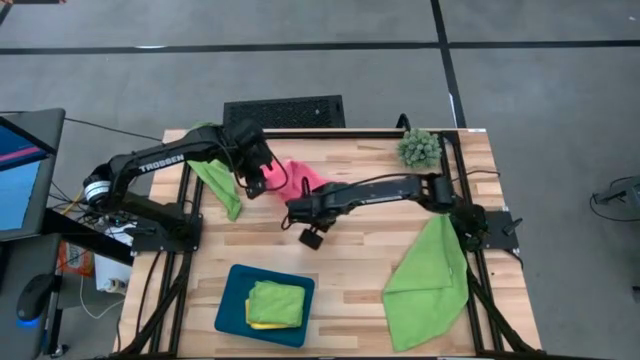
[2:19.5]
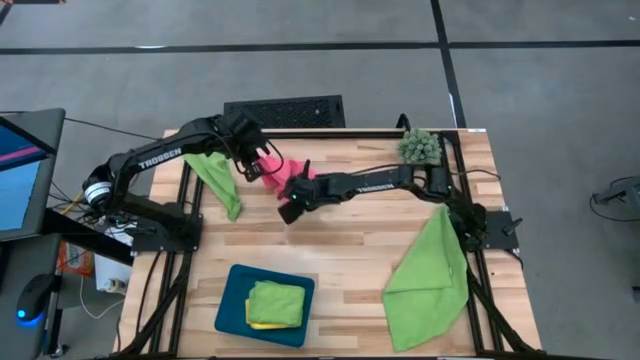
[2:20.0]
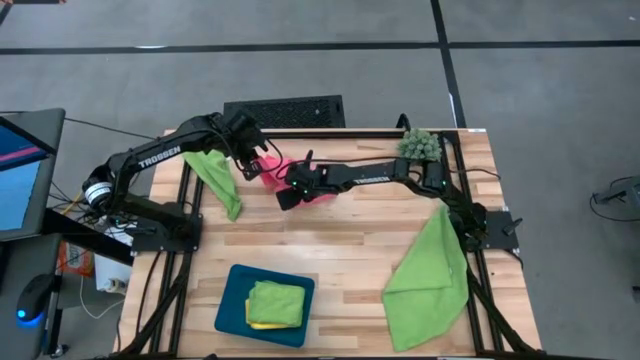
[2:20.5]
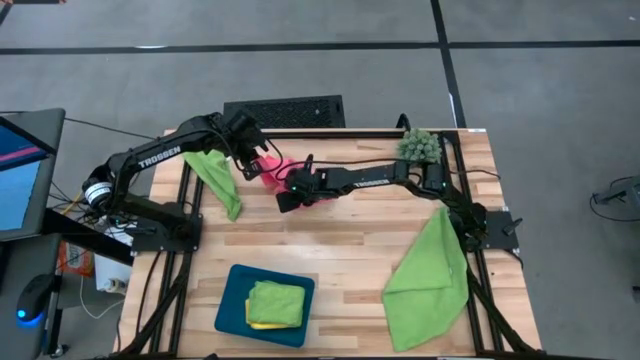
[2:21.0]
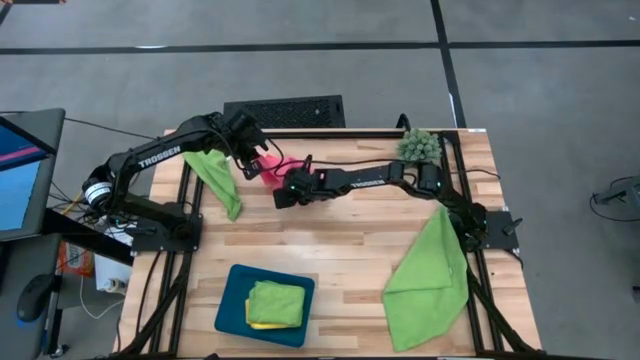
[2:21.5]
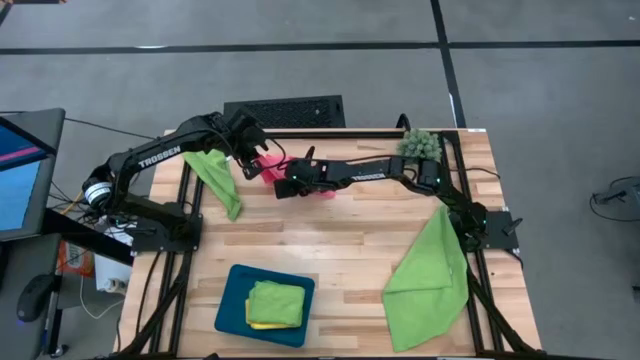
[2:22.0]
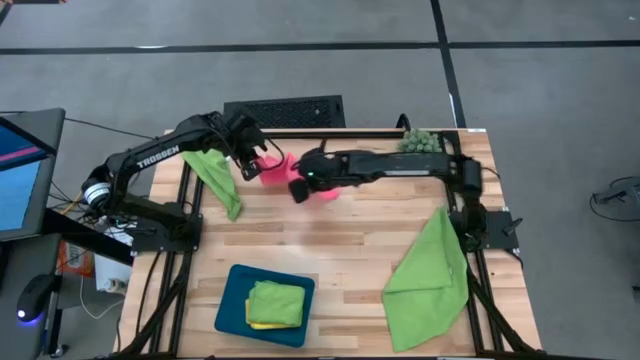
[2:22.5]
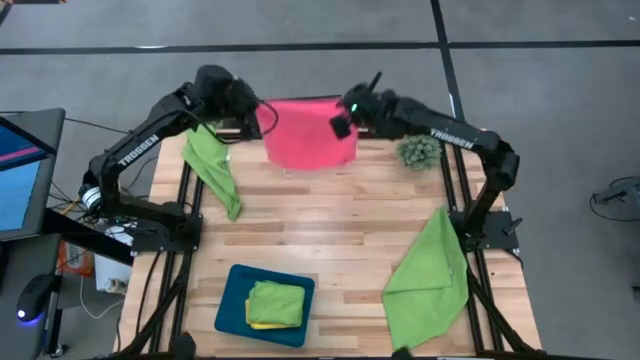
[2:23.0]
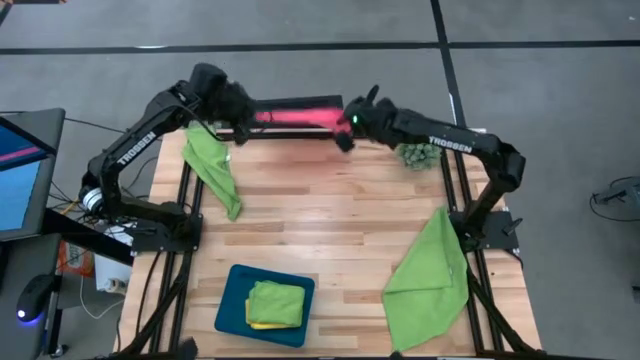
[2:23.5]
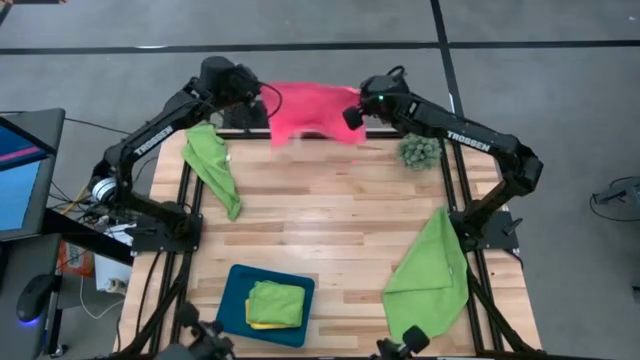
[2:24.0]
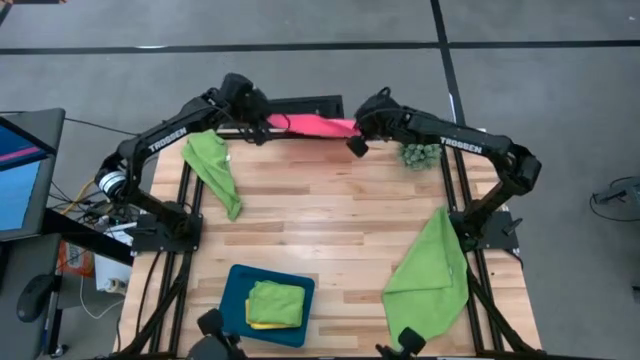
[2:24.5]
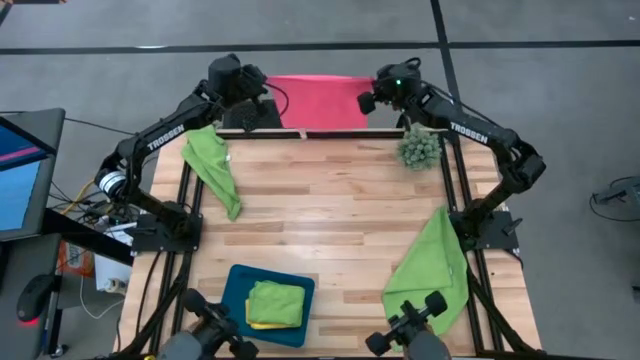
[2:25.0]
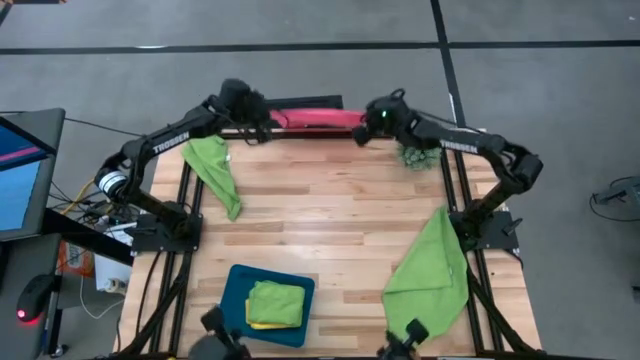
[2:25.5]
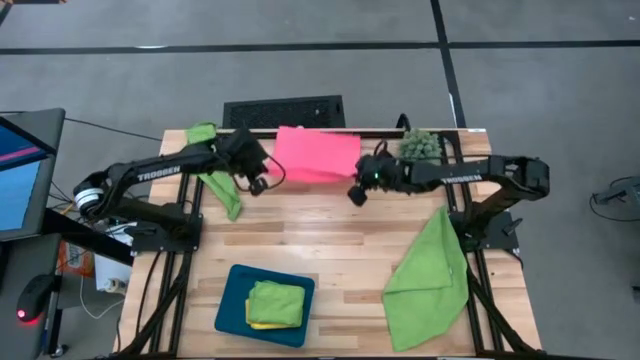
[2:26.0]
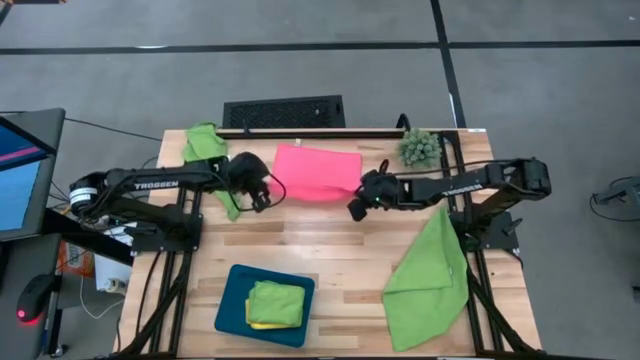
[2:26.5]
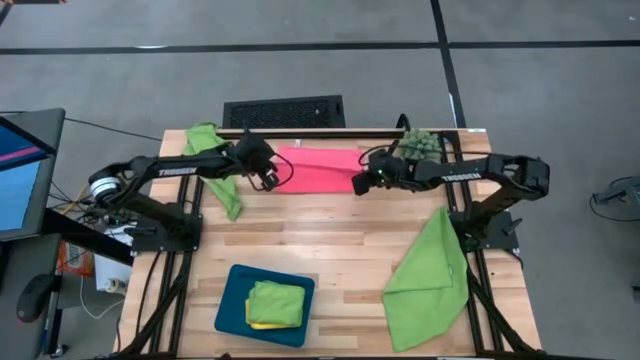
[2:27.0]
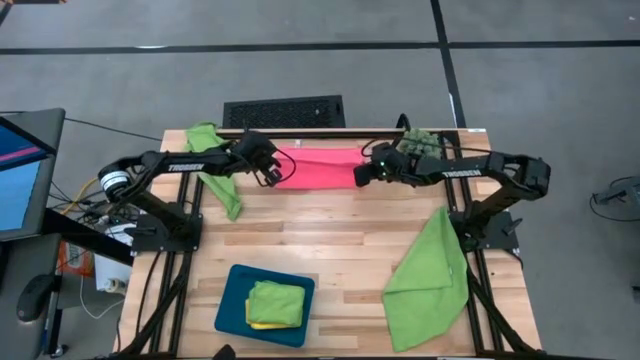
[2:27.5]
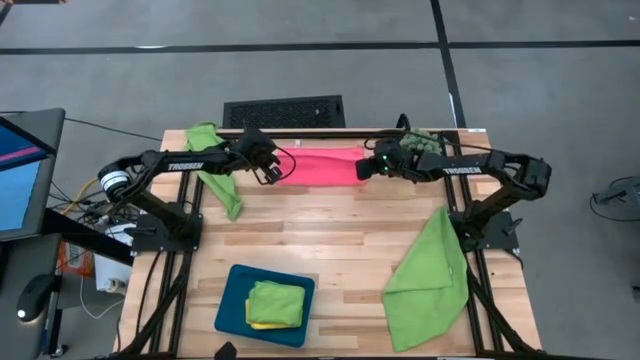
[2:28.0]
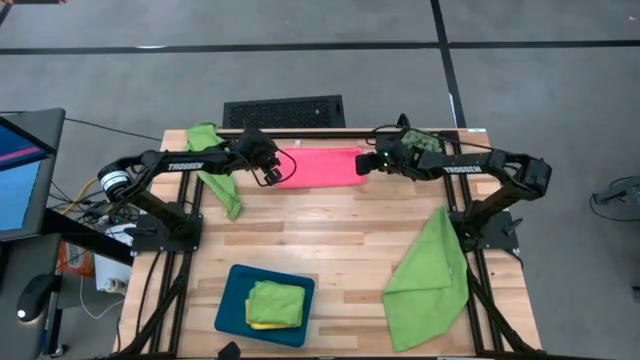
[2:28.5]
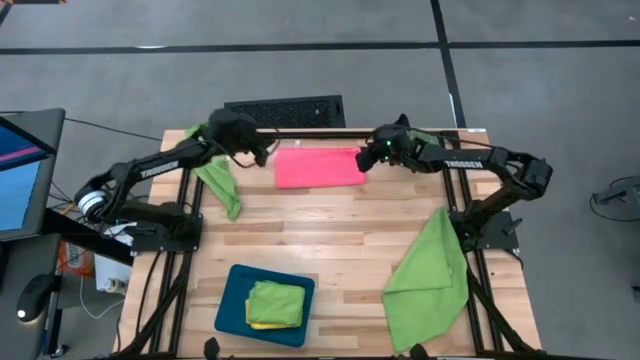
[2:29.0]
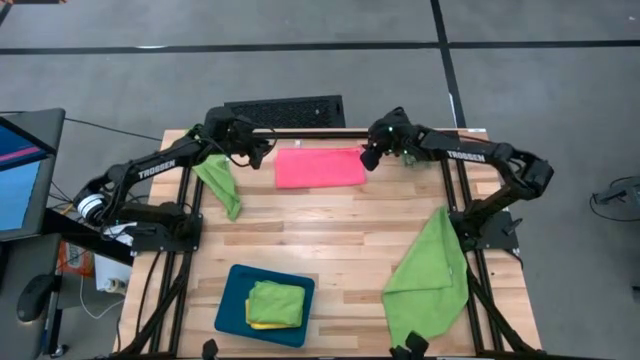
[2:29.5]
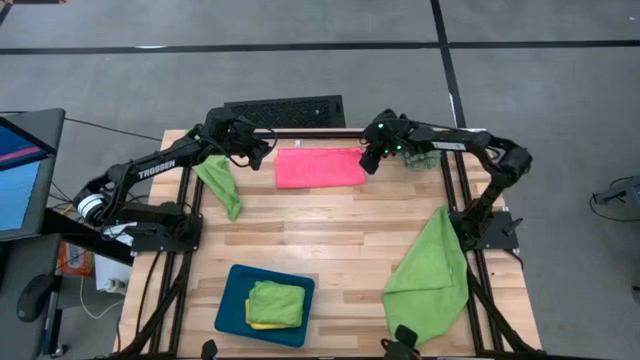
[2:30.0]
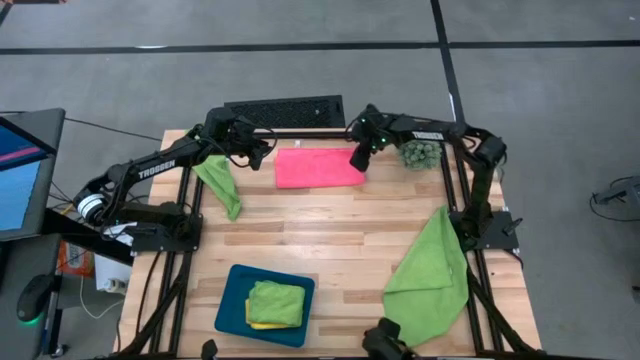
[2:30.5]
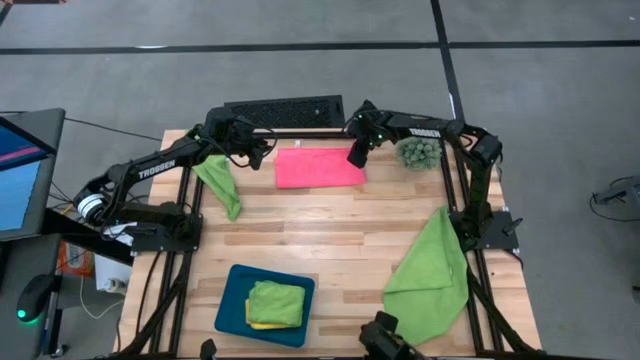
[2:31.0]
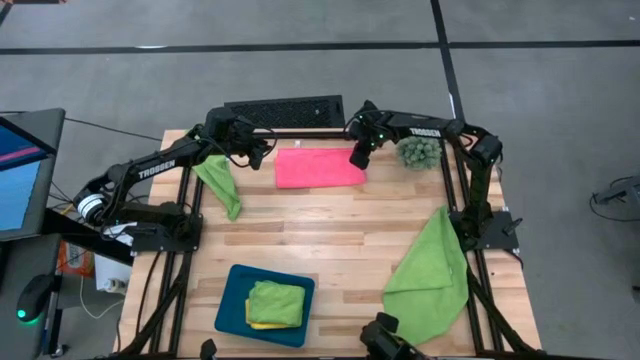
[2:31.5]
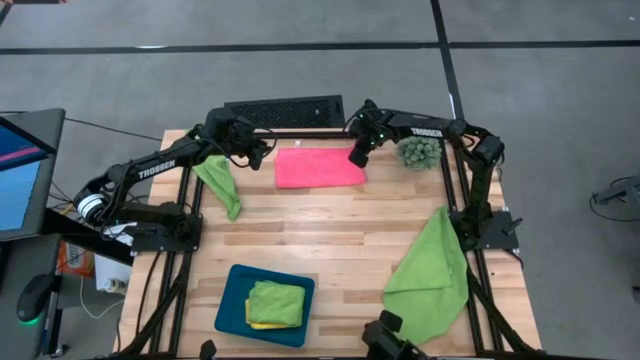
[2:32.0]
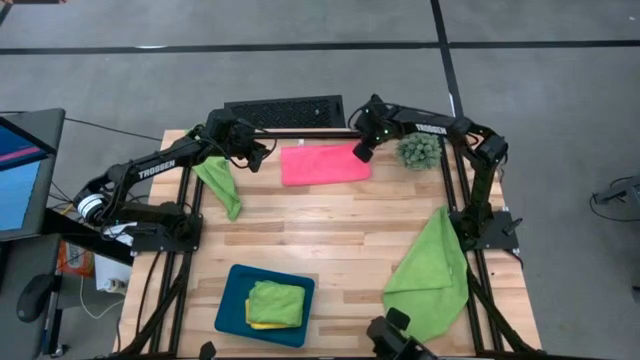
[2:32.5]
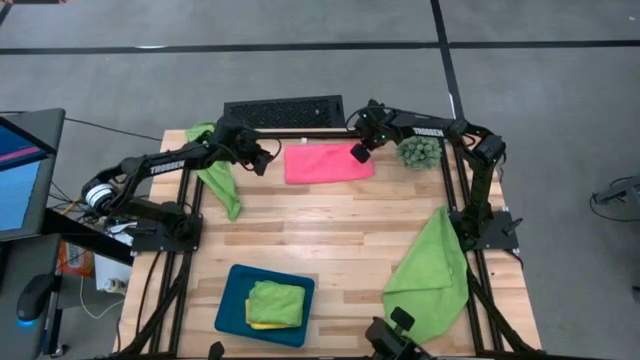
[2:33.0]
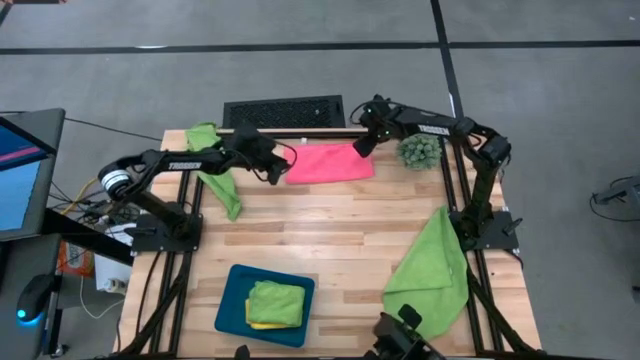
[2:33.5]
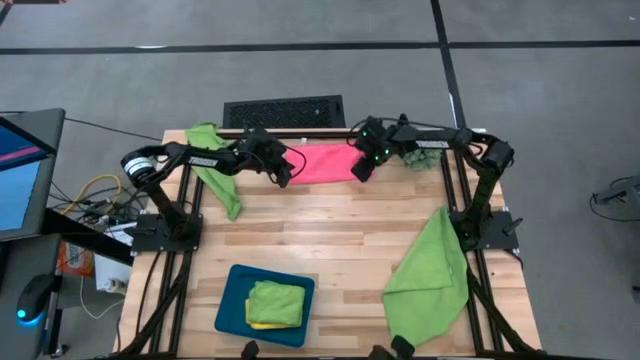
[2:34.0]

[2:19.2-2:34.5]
Task: Fold microfiber towels
Fold the pink microfiber towel

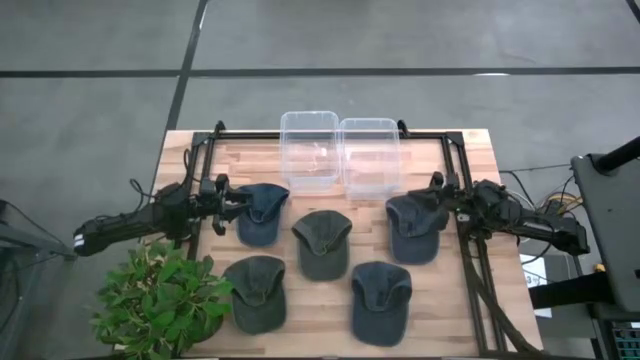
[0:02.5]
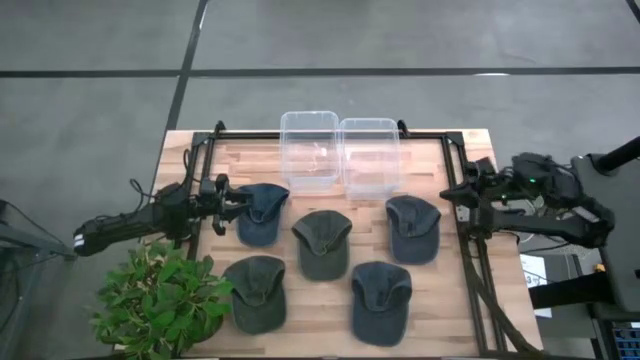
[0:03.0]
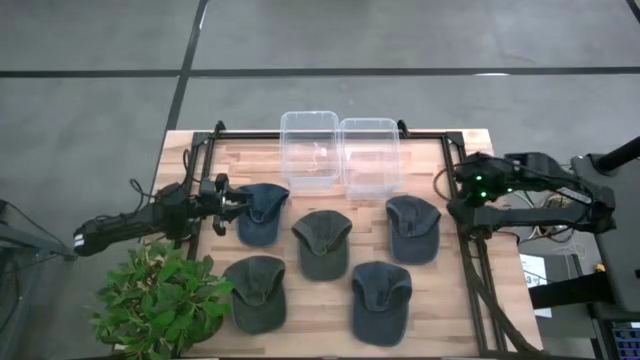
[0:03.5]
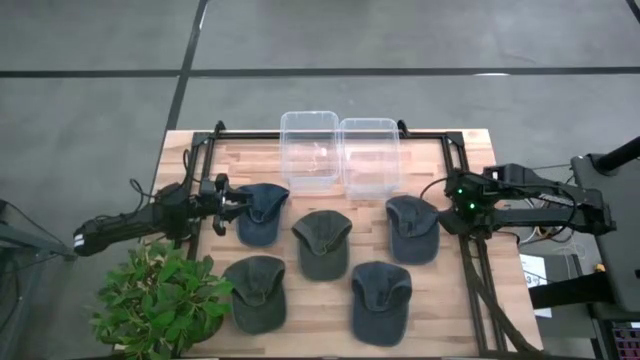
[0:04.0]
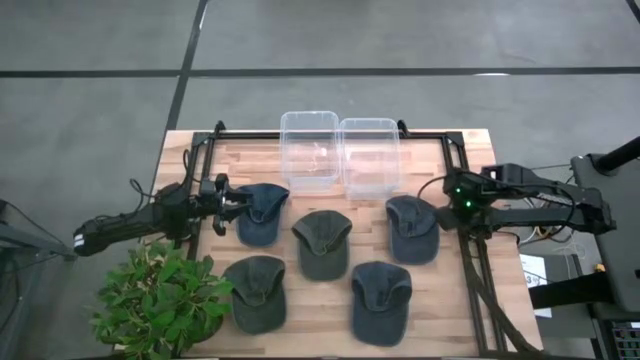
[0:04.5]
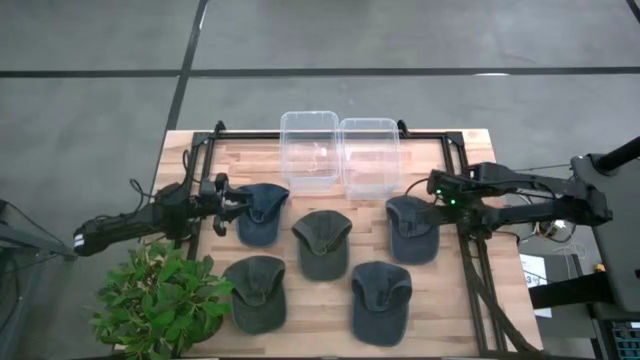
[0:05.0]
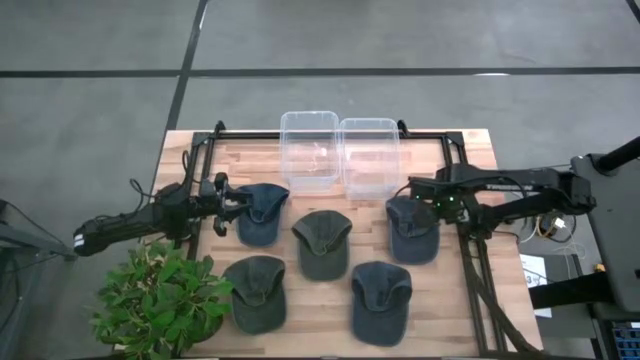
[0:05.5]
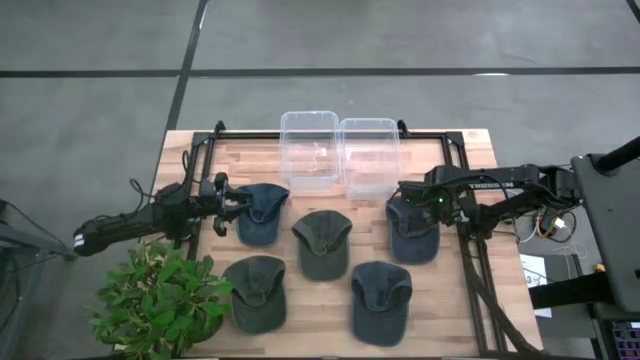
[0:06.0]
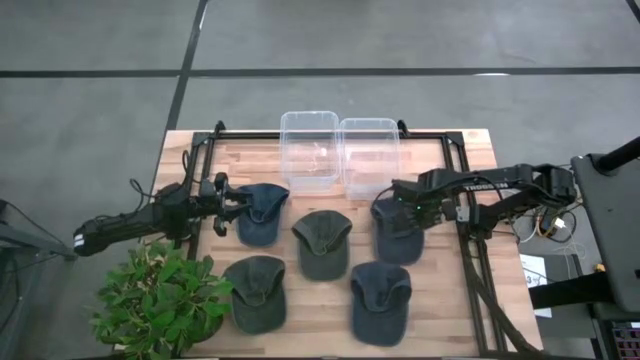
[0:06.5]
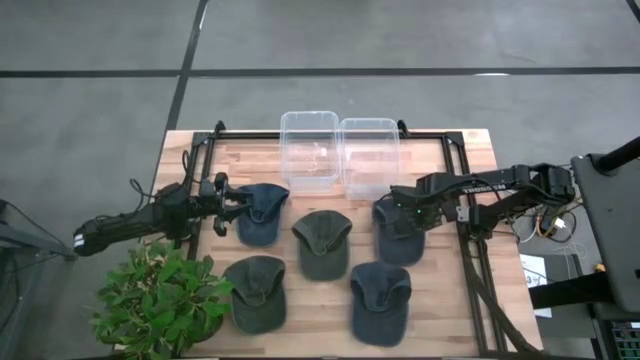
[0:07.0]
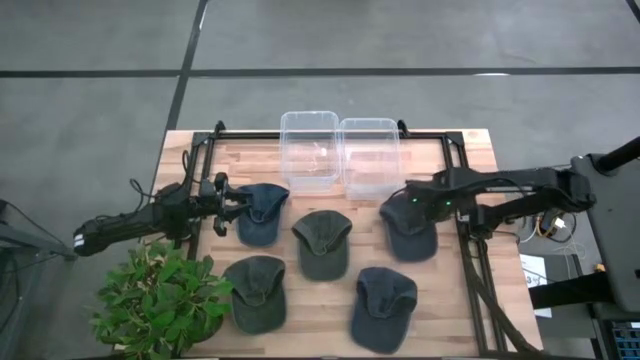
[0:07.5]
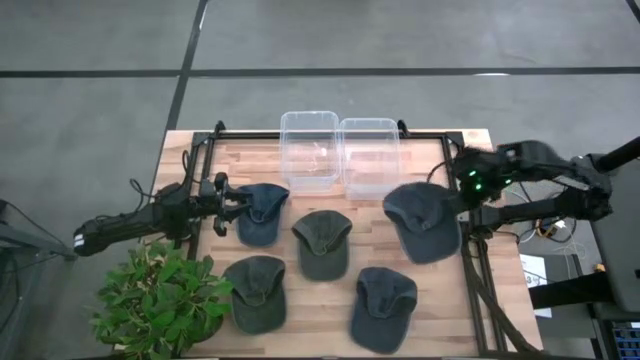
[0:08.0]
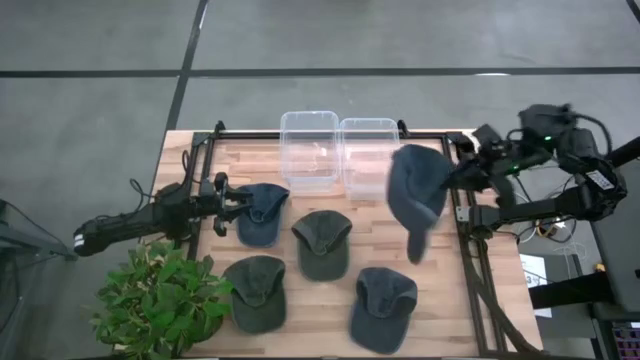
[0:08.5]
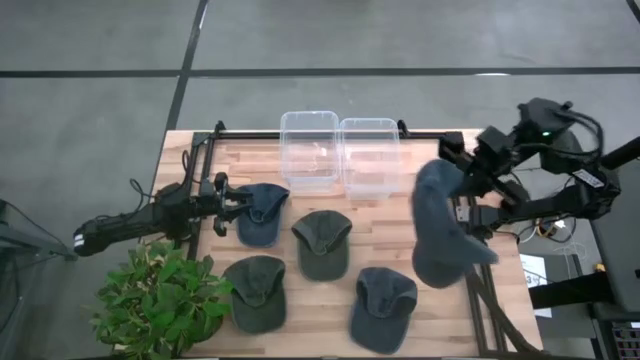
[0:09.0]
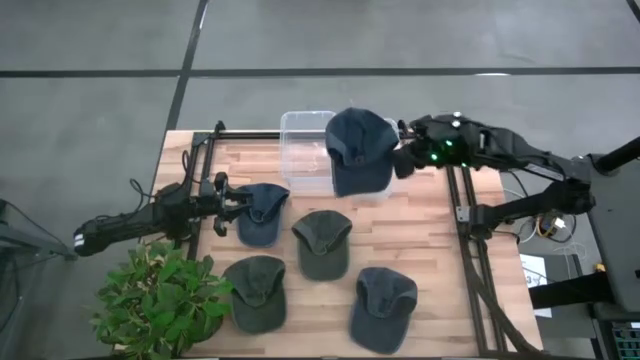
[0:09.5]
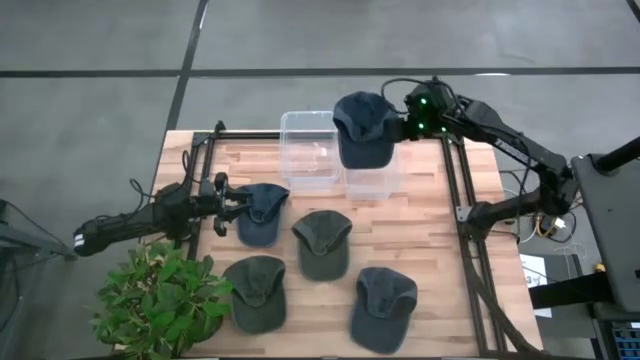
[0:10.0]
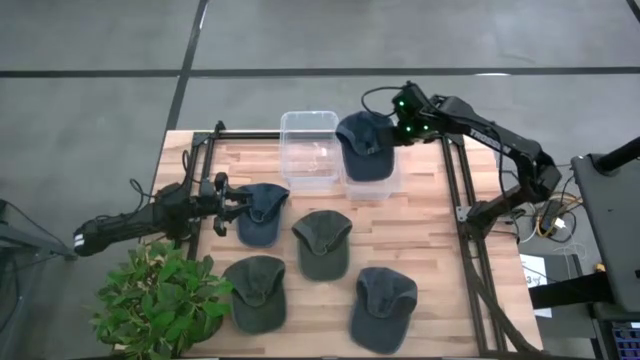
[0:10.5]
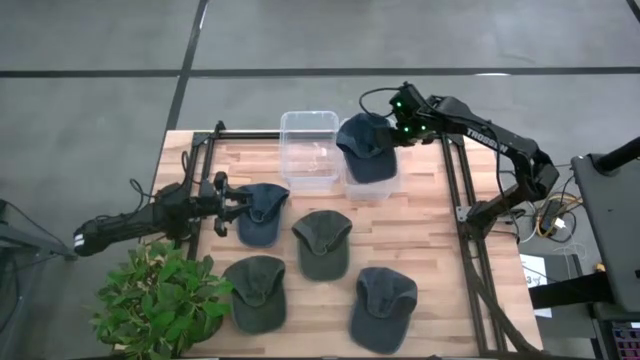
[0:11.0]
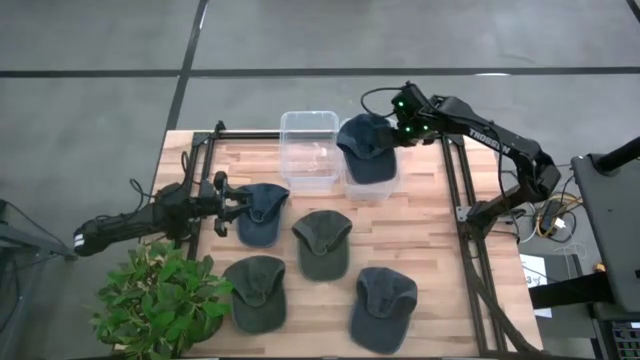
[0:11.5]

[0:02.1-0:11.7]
Task: Pick & Place hat
Put the top right blue cap into the right transparent bin
